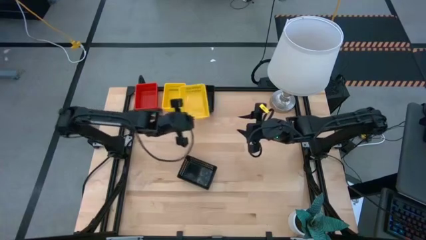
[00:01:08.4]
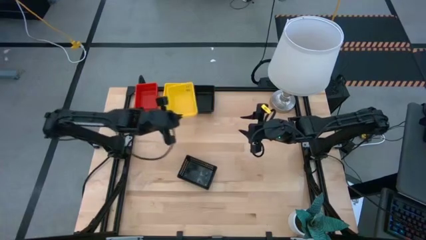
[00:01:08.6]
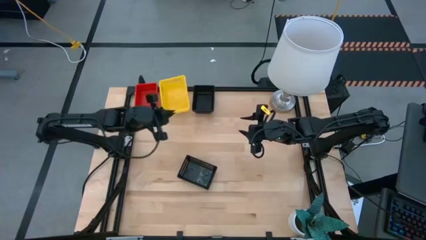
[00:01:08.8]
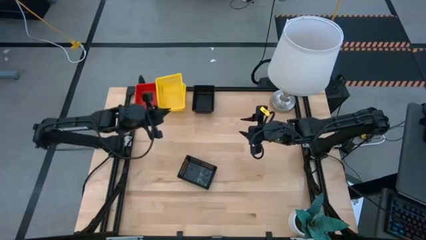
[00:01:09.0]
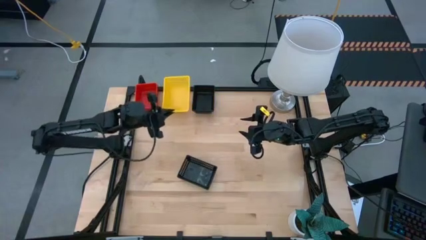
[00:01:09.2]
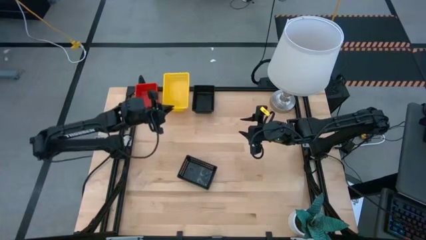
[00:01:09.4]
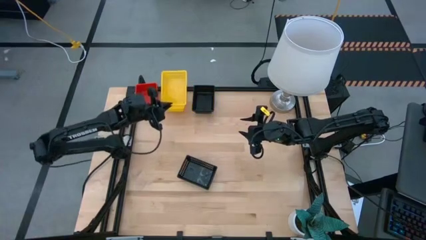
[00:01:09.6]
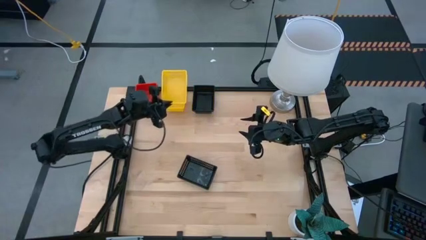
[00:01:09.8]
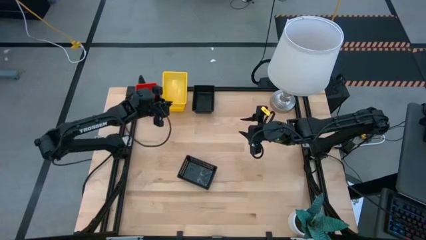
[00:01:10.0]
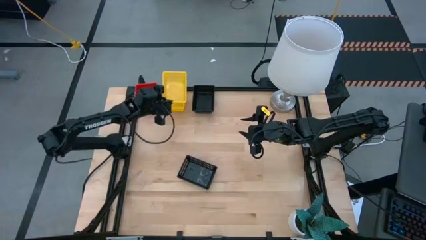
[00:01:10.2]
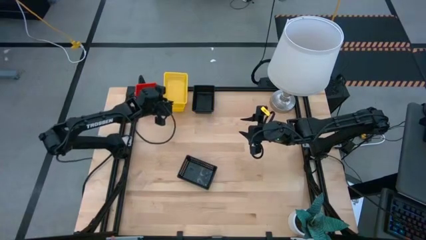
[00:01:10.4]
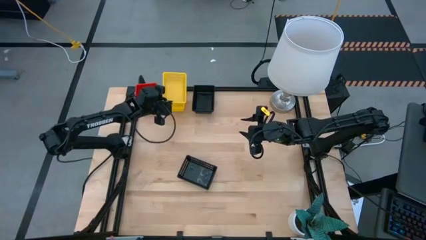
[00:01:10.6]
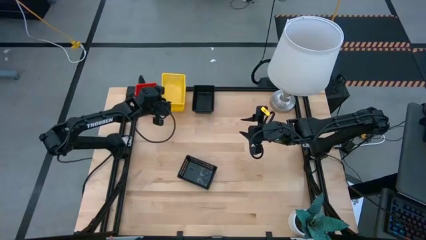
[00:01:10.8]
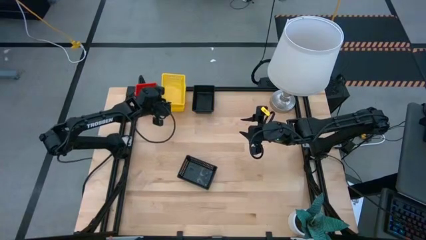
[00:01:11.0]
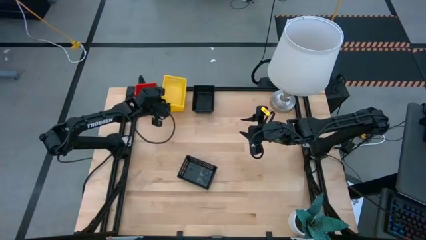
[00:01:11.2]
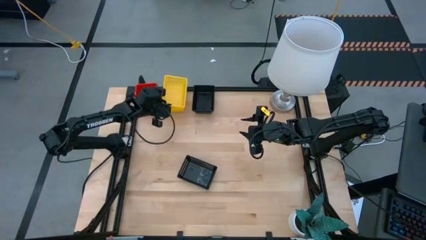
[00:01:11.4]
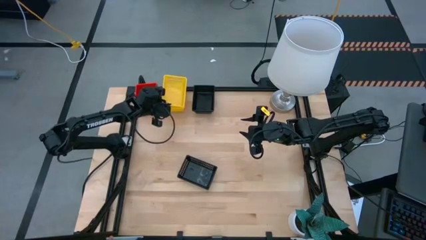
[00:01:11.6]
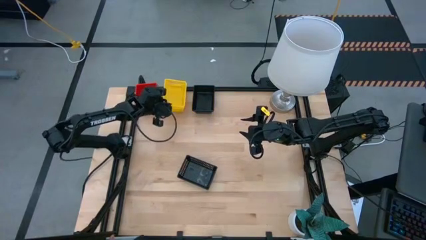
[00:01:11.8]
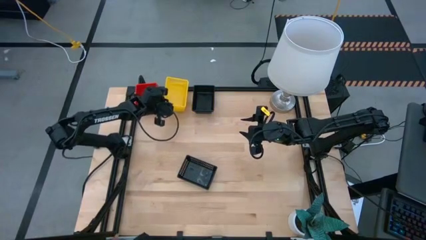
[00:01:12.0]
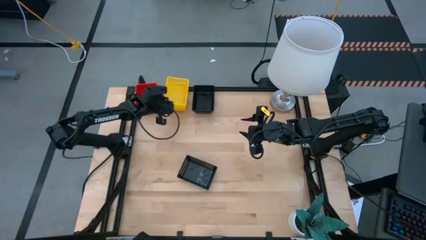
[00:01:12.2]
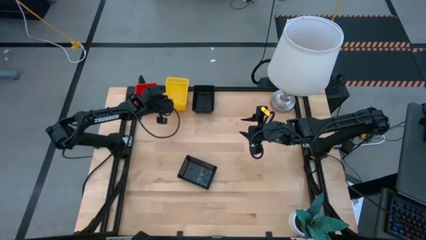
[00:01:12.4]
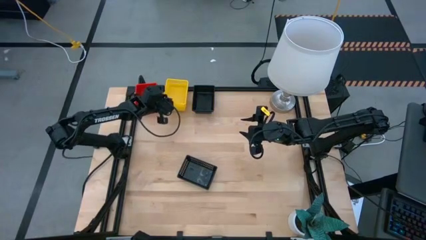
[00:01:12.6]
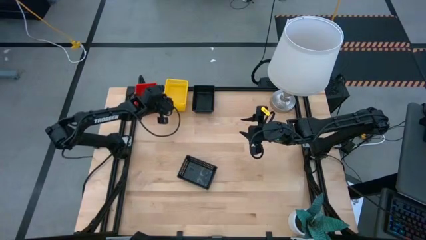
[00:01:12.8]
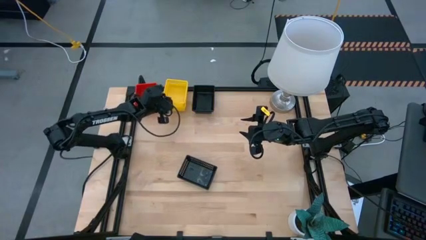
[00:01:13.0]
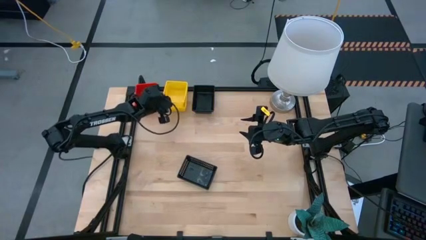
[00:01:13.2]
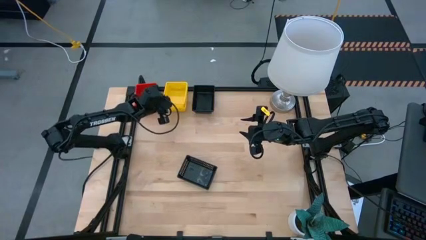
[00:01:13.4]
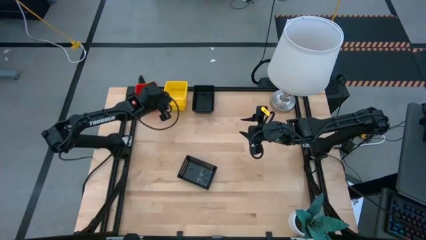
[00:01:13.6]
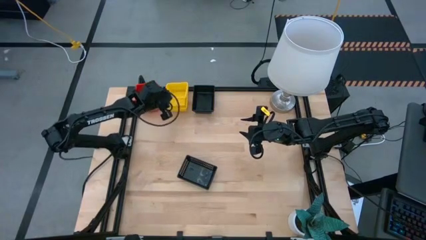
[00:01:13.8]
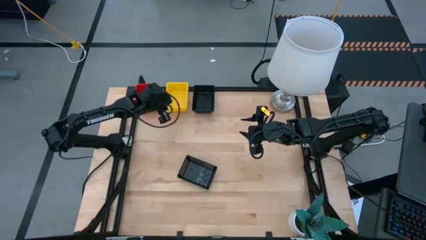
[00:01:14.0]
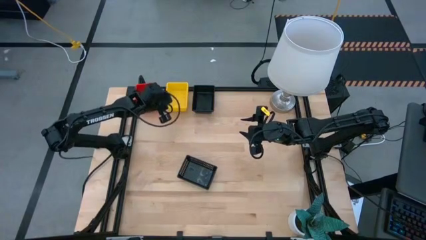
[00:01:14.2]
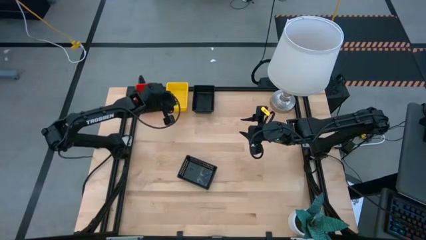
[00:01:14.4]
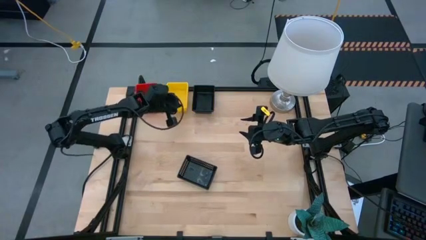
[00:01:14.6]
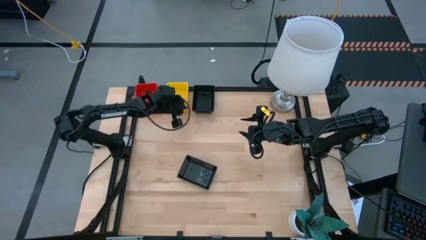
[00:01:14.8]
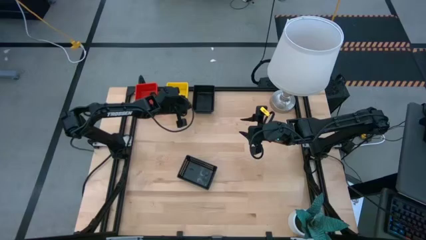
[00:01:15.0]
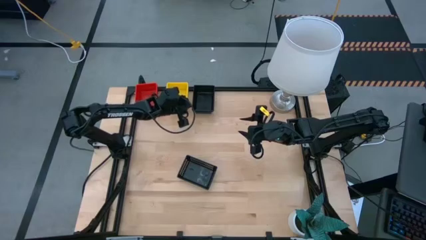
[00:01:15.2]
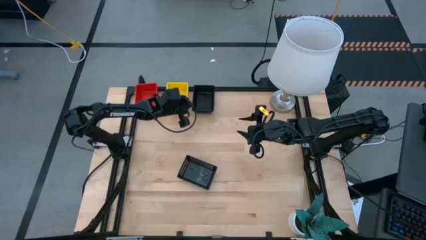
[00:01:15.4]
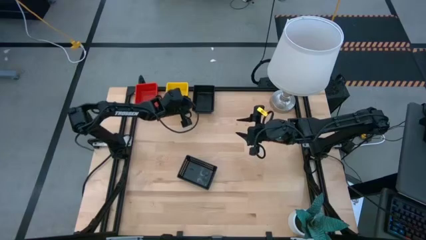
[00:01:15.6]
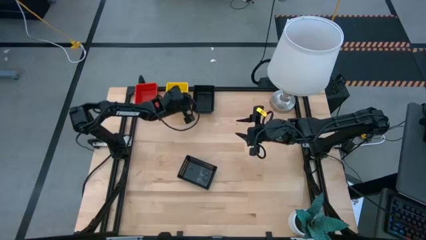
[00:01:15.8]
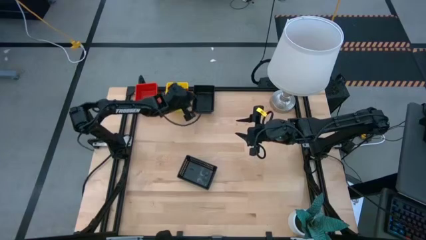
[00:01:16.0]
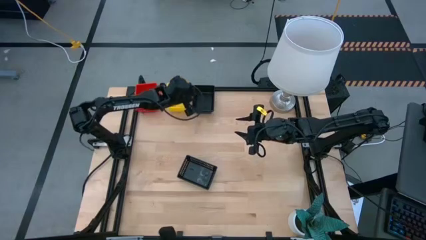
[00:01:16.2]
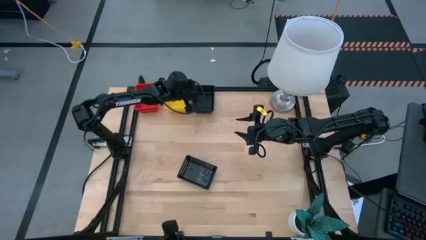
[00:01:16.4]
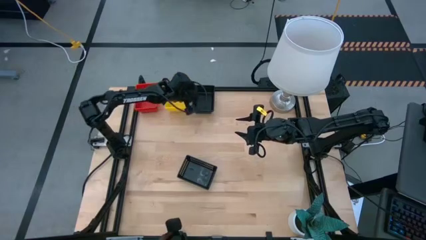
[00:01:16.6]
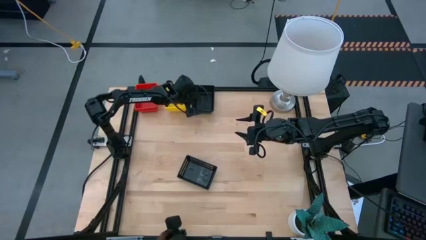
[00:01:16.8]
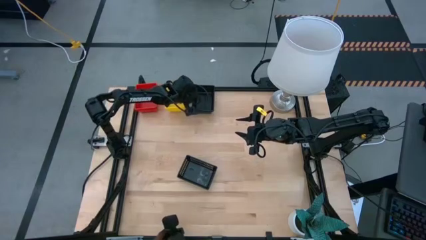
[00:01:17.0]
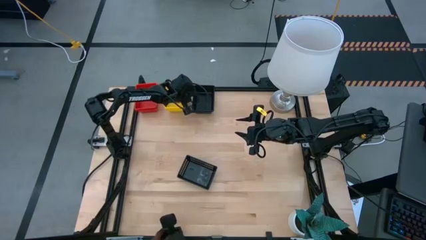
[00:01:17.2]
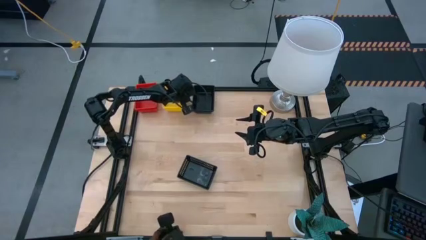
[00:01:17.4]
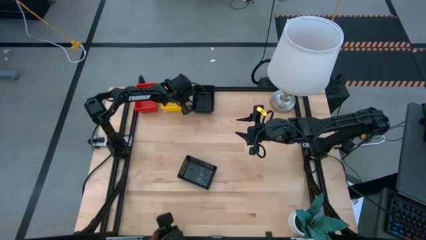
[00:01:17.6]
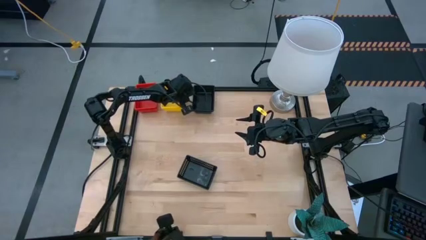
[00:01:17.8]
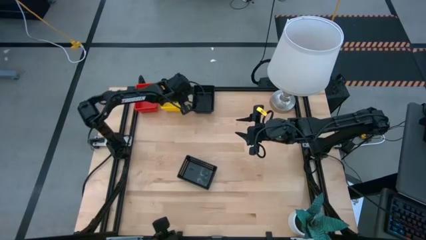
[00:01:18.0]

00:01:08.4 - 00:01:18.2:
Stack the bottom yellow bin on top of the top yellow bin

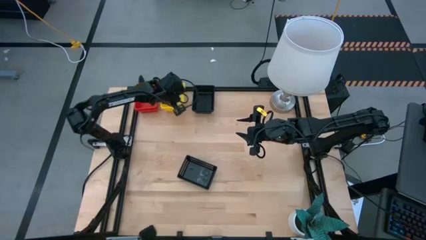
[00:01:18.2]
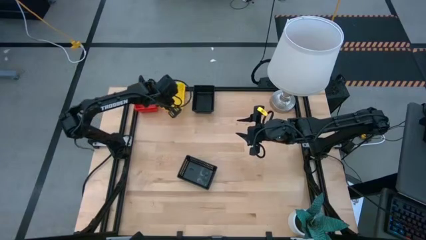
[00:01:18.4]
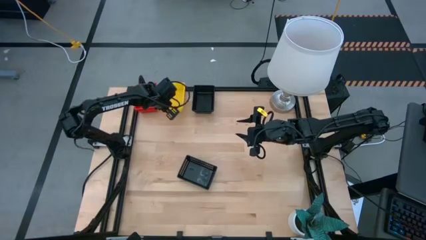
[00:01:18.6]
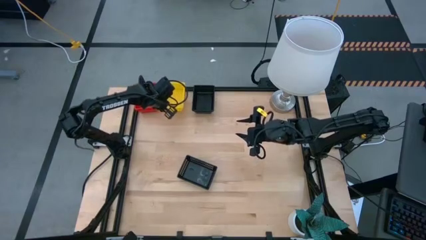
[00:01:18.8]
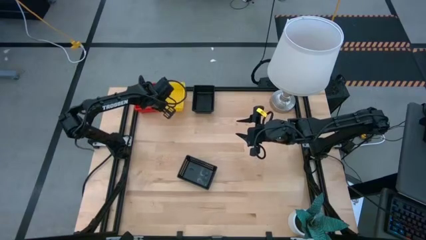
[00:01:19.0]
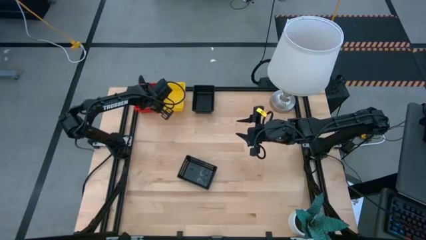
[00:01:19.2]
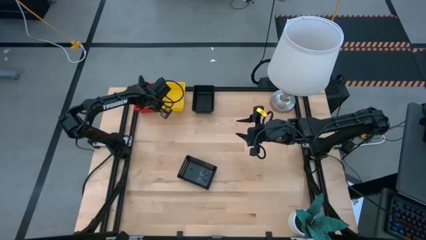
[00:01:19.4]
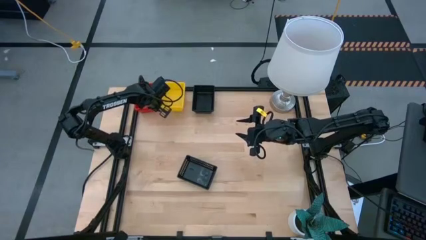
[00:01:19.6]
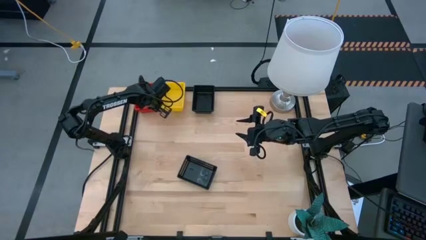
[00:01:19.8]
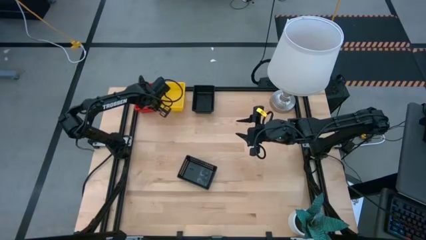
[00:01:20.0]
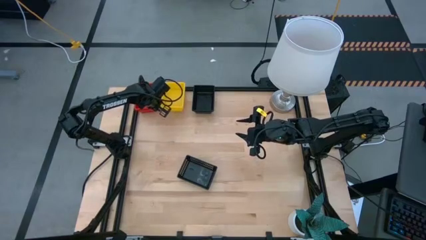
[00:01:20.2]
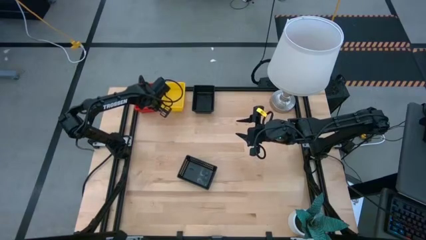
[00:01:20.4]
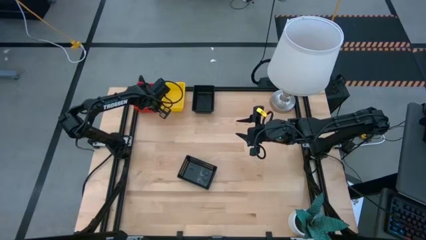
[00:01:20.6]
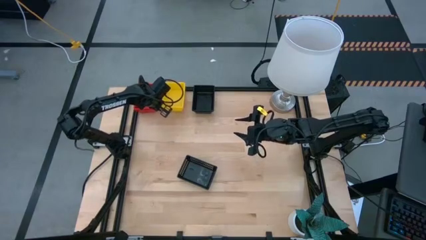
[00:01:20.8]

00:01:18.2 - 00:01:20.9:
Adjust the stacked red bin

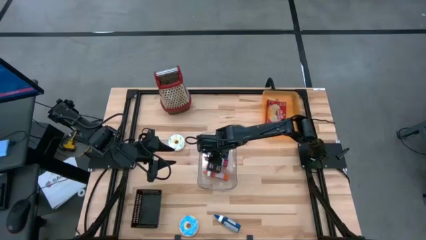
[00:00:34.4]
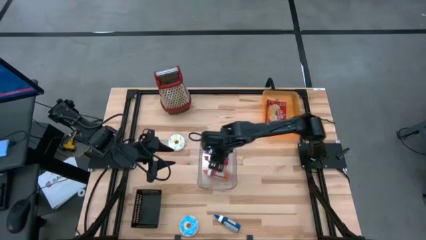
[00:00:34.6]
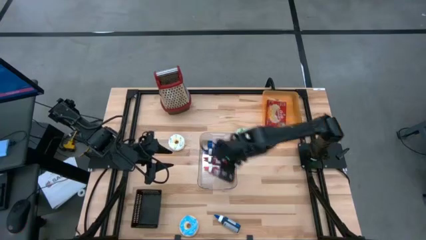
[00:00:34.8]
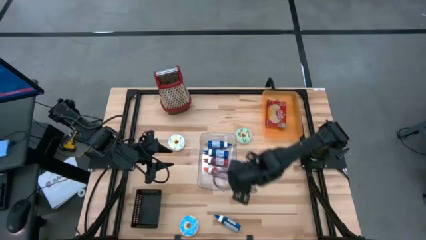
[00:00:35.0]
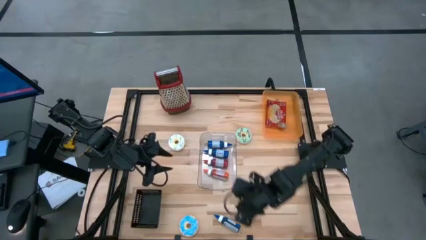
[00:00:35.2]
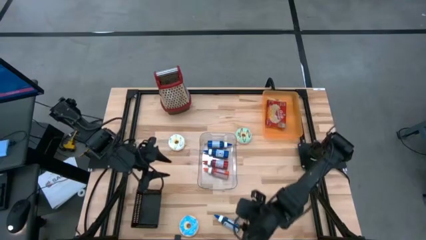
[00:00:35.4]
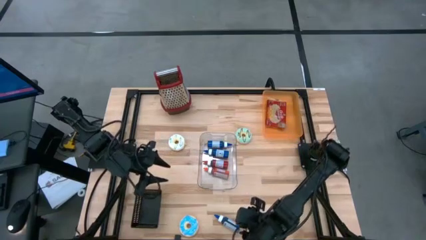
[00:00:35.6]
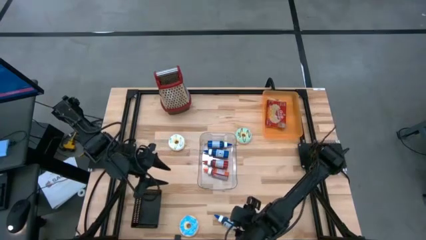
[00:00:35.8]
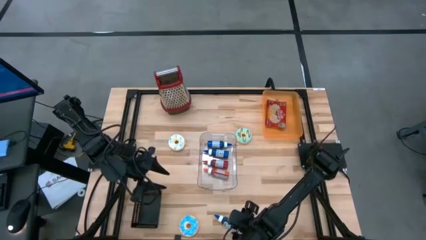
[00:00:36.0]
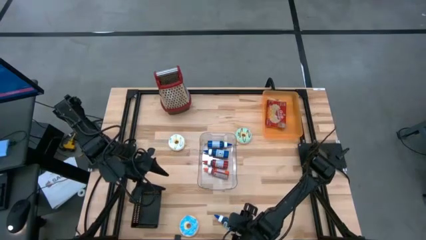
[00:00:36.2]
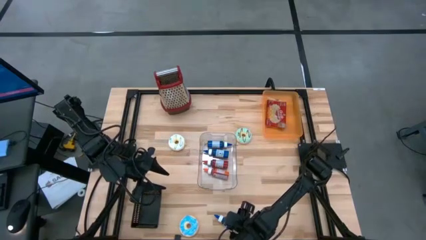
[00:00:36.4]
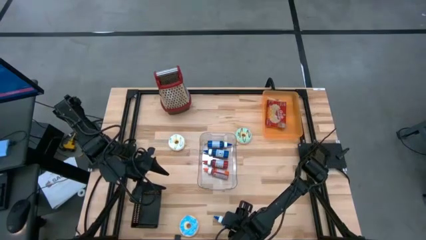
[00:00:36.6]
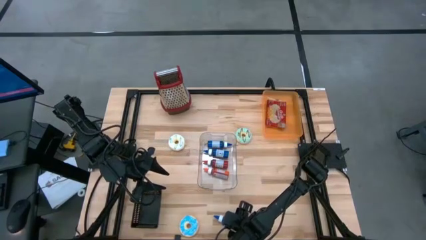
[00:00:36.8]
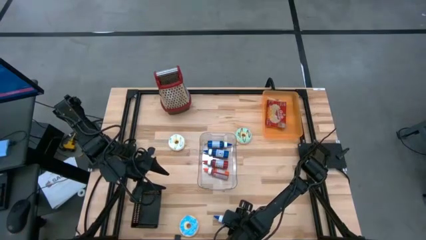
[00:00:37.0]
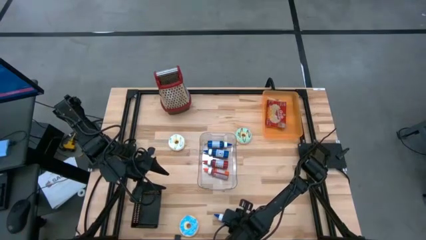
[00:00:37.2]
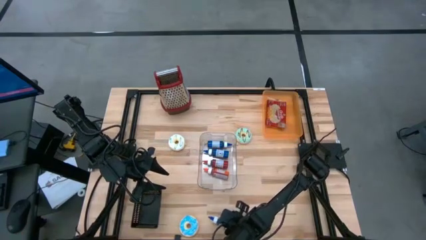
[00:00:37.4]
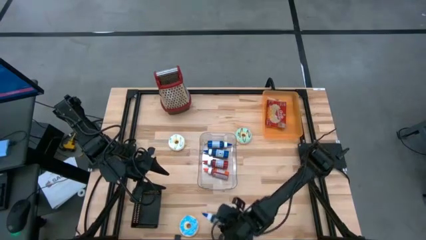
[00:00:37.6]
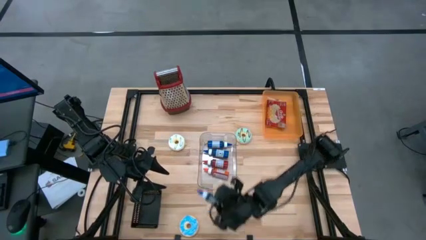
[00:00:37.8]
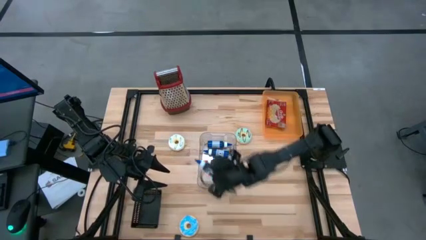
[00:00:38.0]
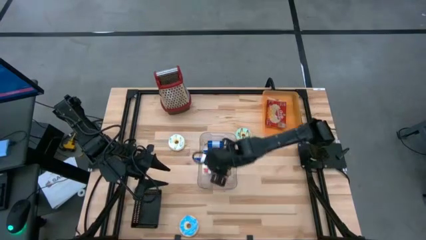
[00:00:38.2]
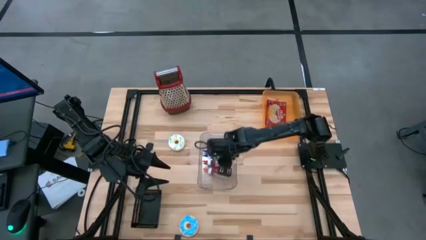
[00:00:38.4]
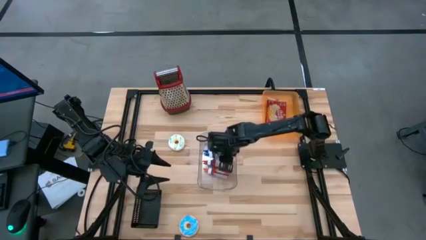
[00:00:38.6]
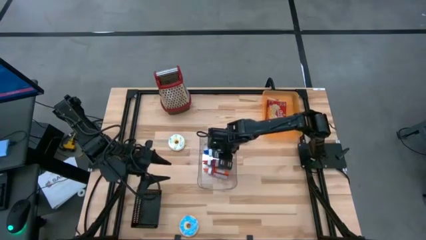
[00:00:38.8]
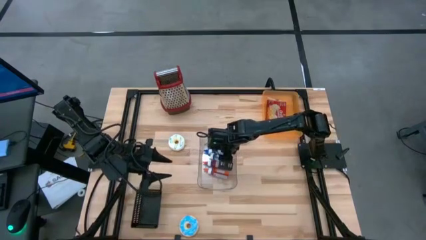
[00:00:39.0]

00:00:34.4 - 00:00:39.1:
Put the blue food coloring bottle into the transparent bin
